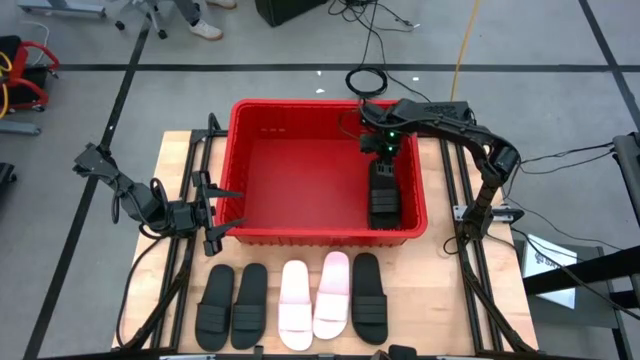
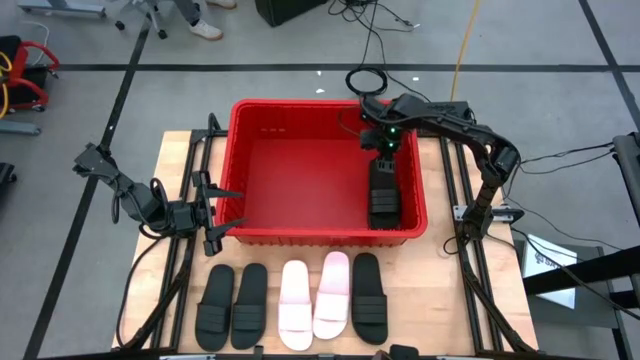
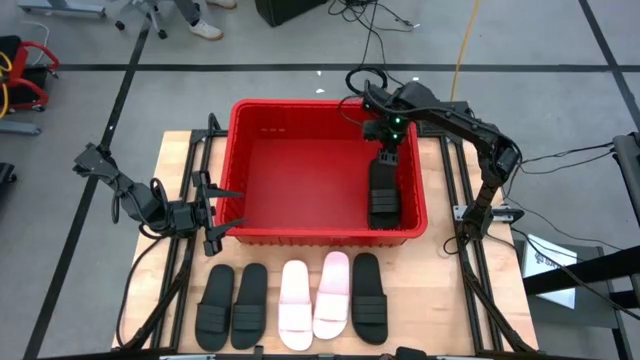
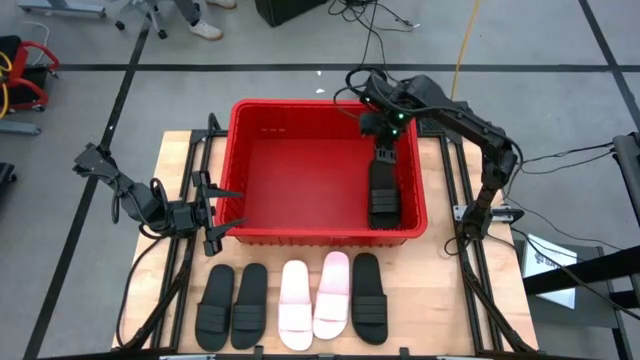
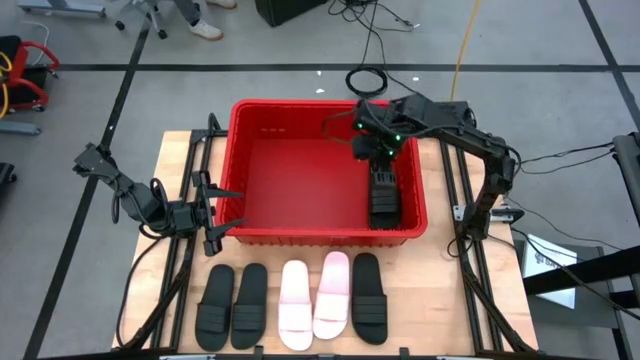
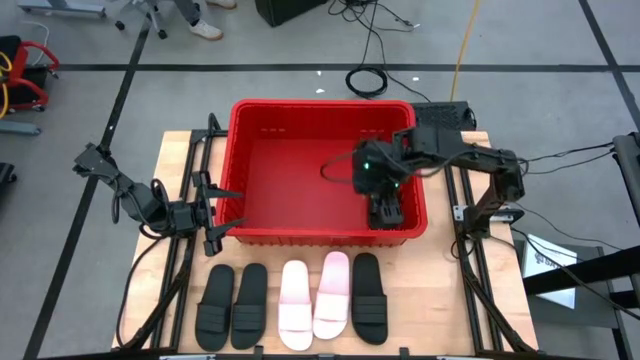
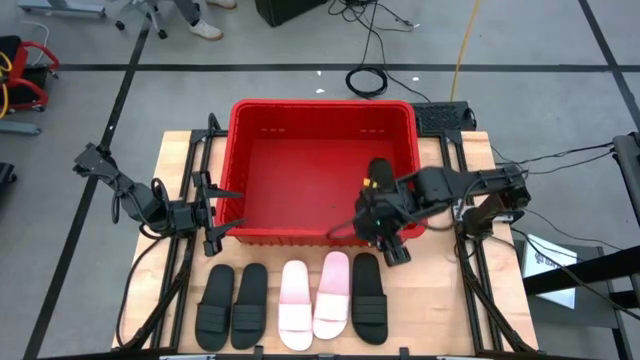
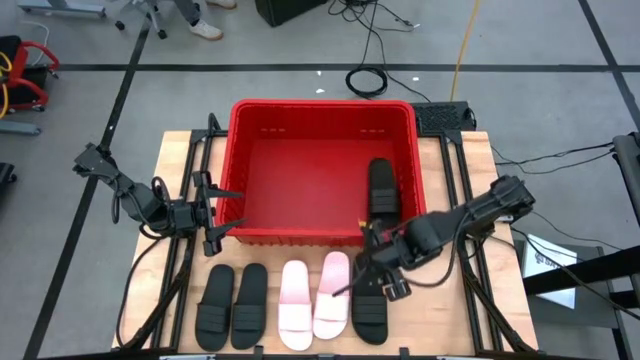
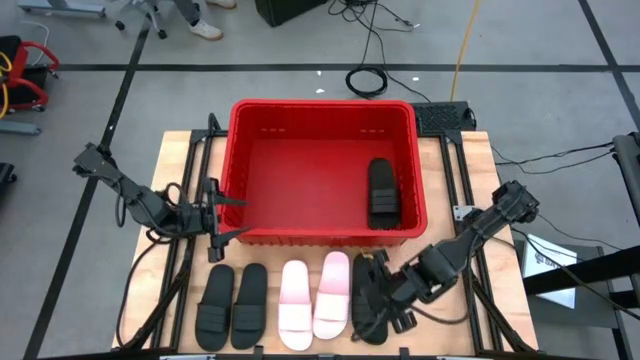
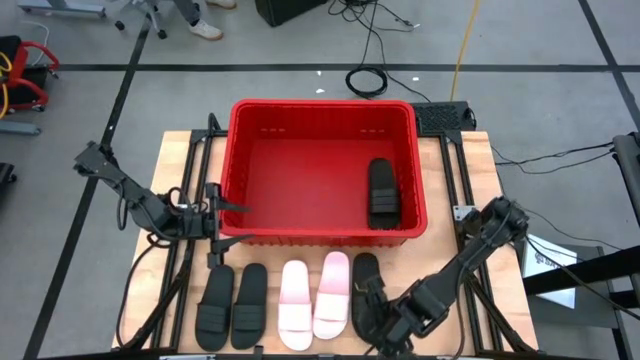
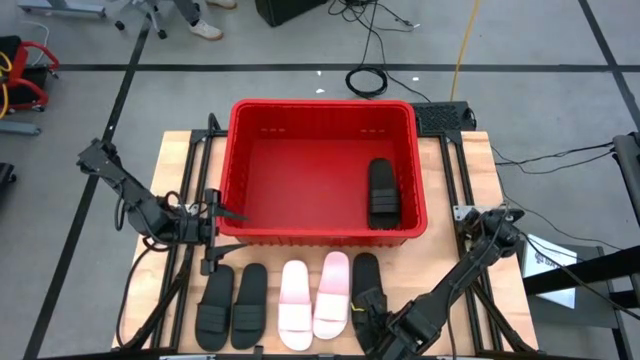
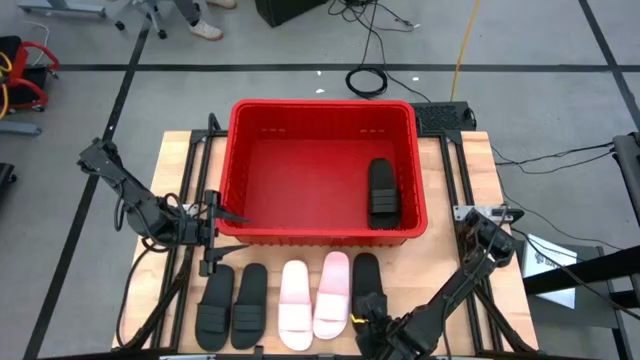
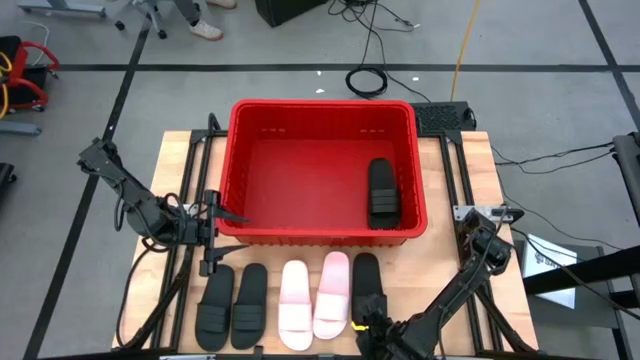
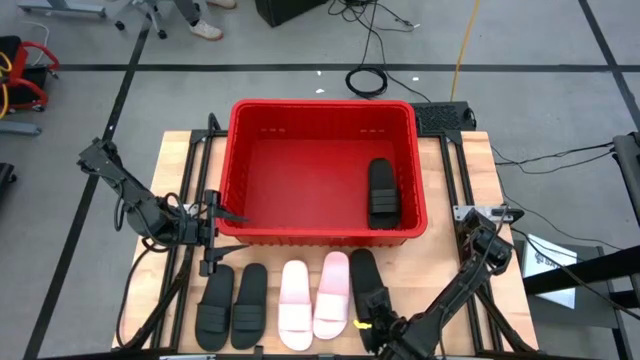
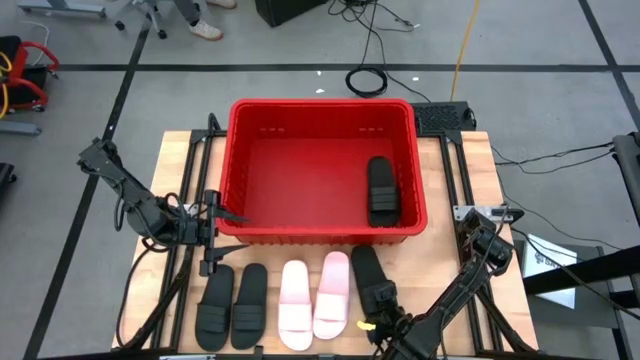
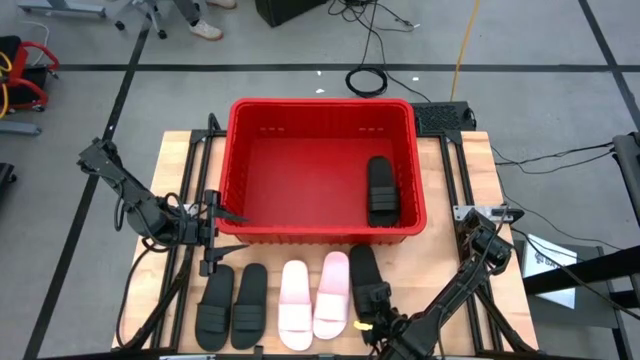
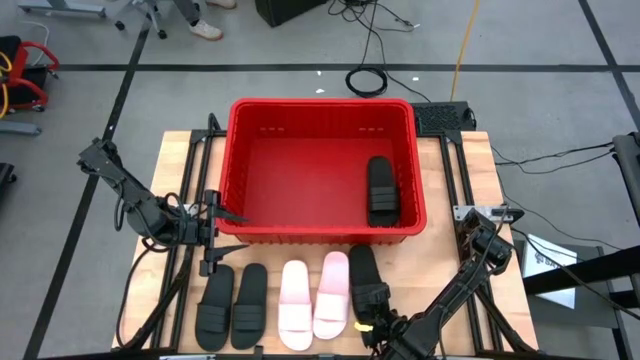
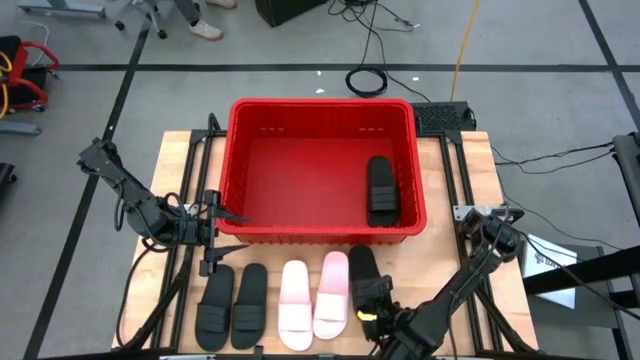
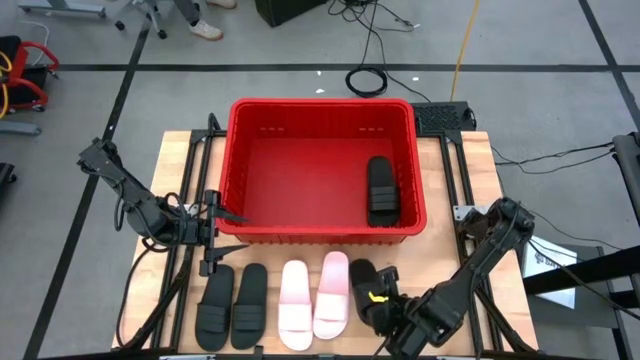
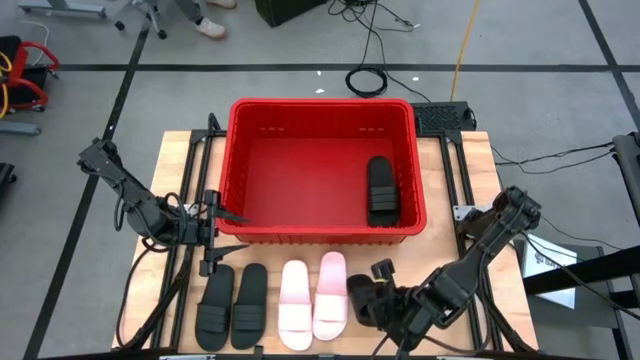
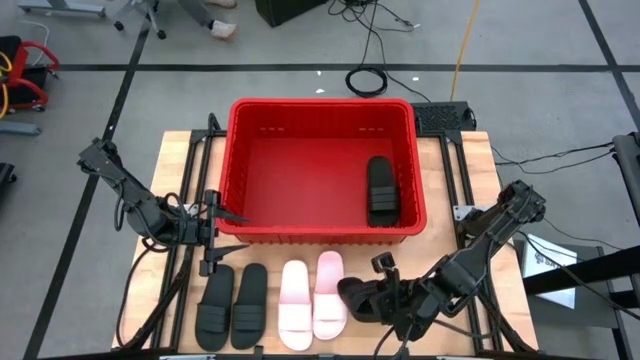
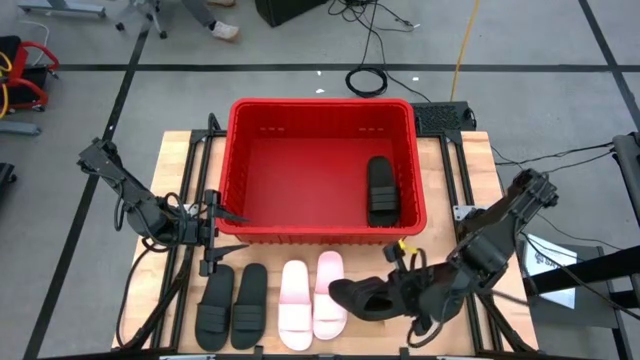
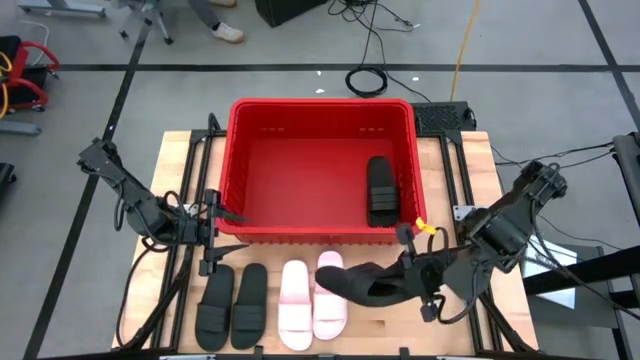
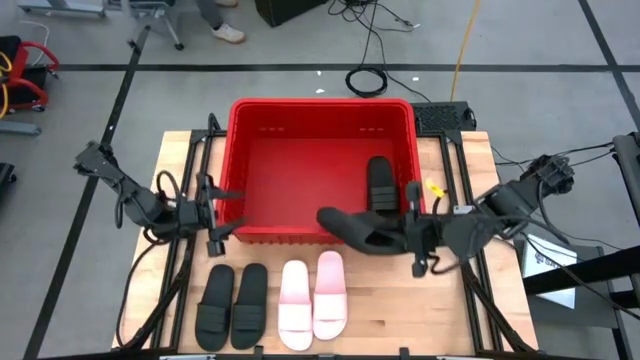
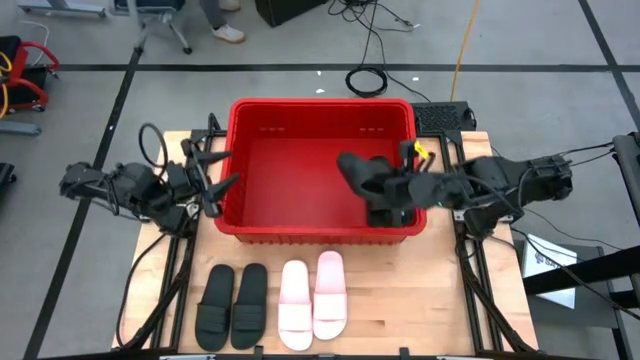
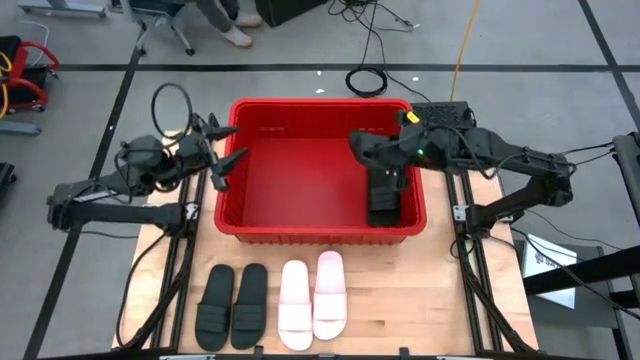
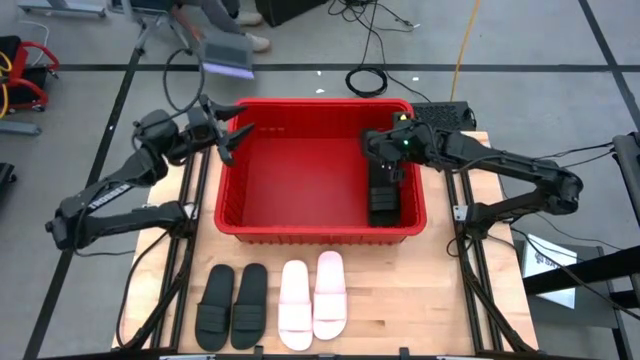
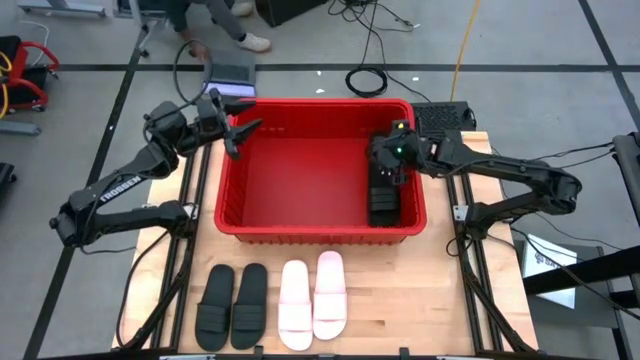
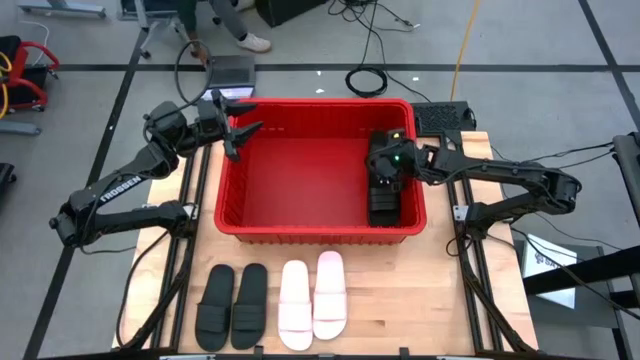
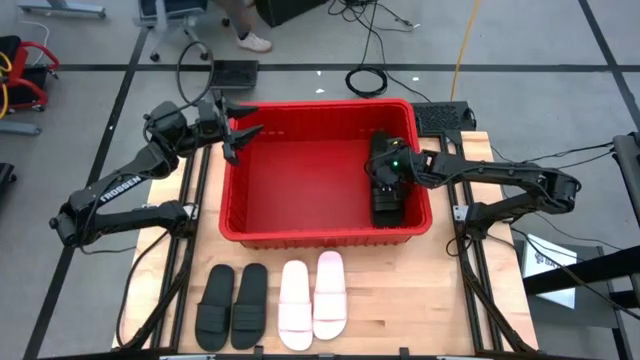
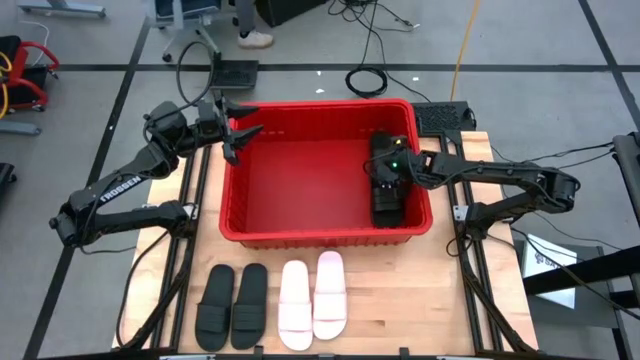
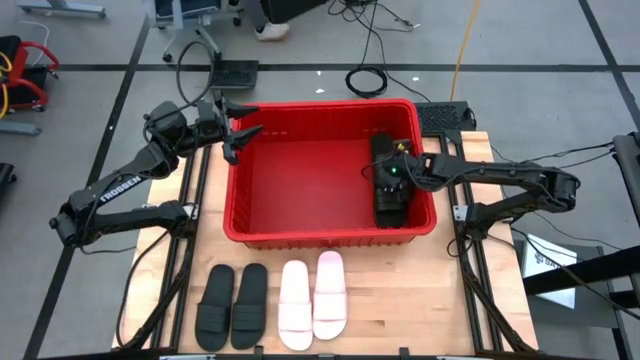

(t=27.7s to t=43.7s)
Task: Pick and place slides into bin
Put the black slide into the red container

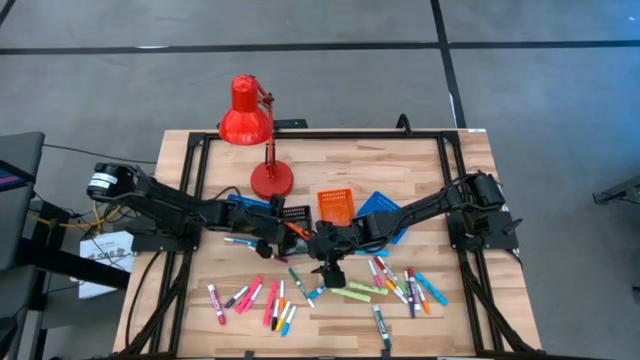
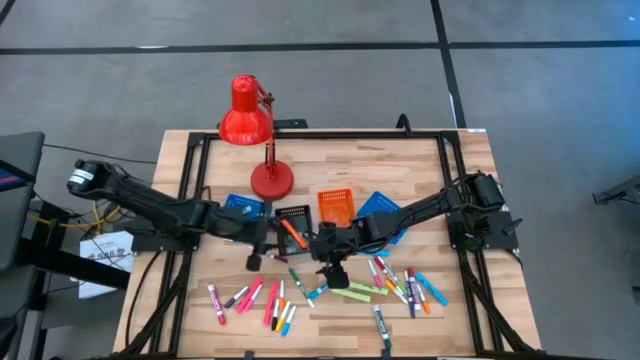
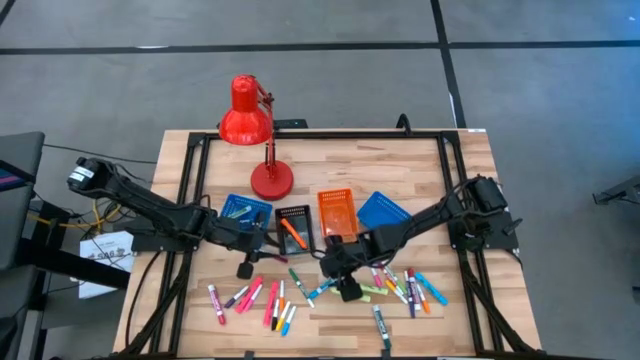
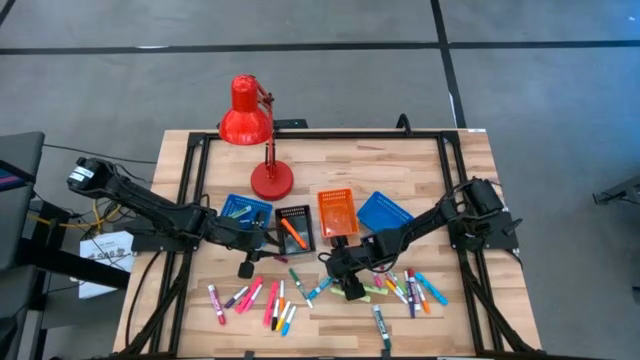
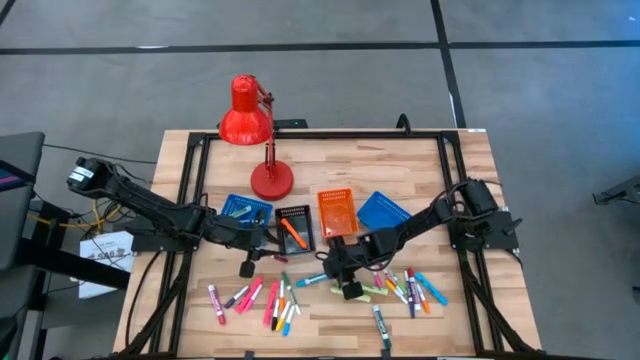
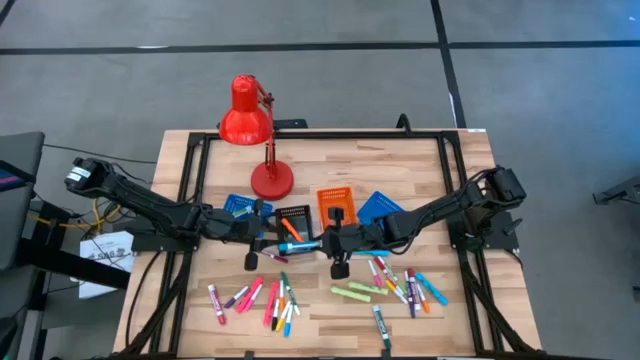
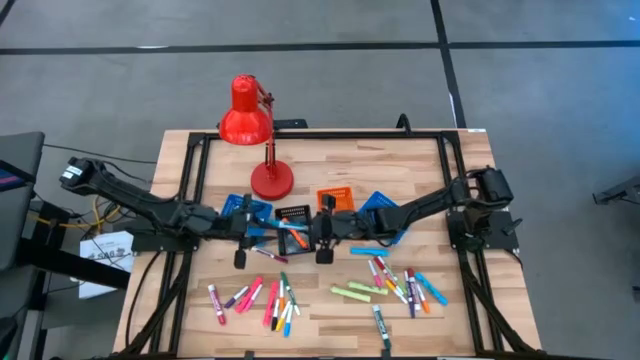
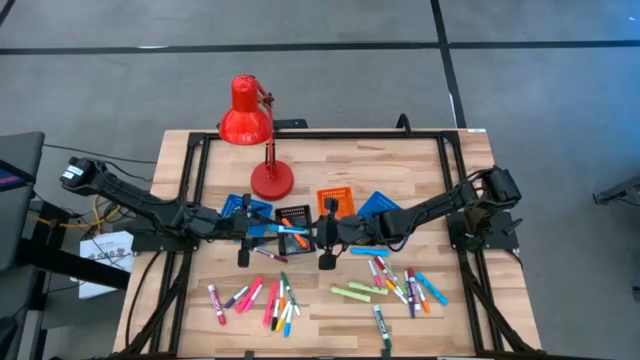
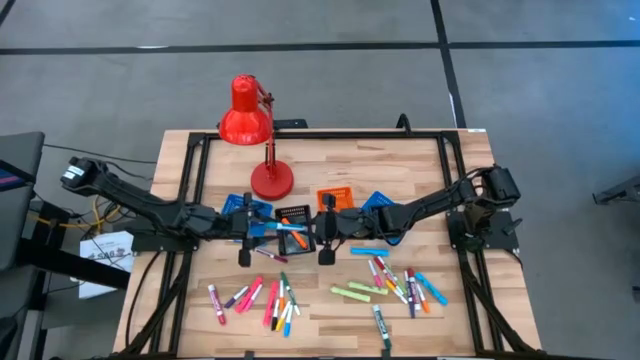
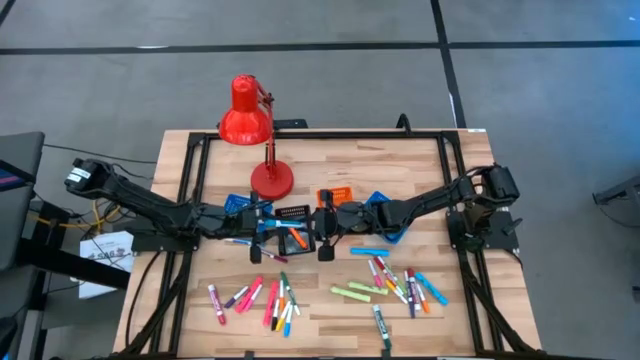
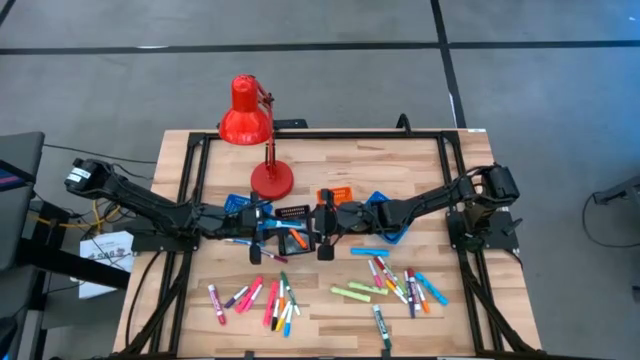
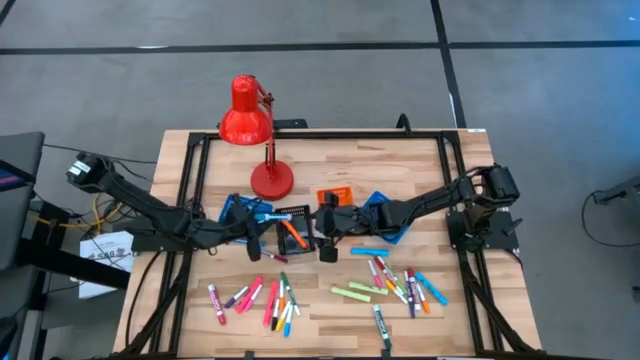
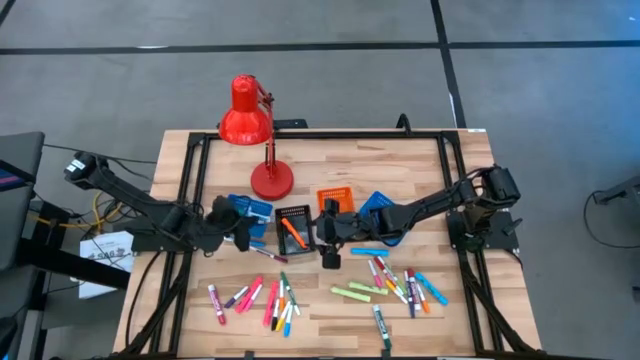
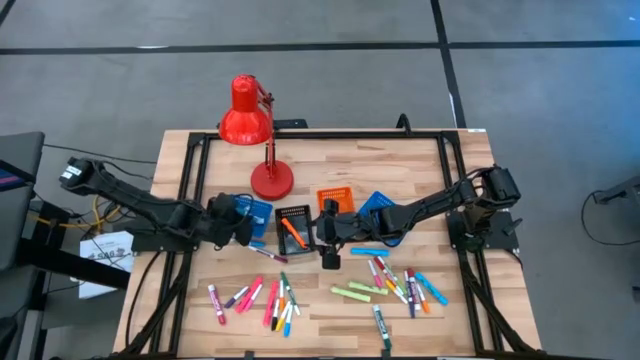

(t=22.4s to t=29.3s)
Task: Pick & Place Markers
Put the large light blue marker pen into the left blue basket
